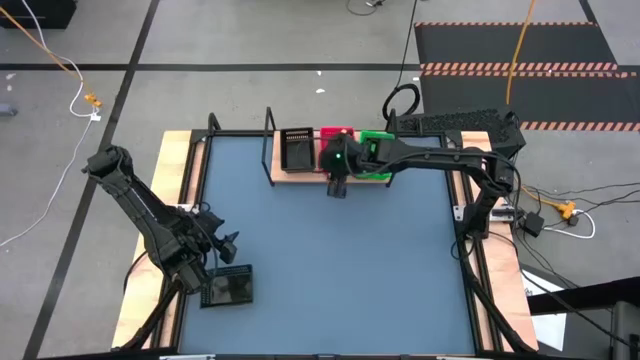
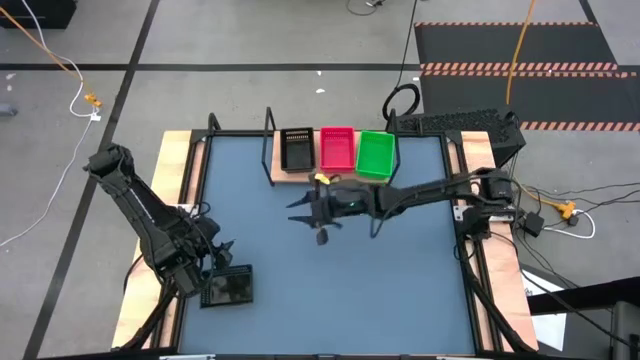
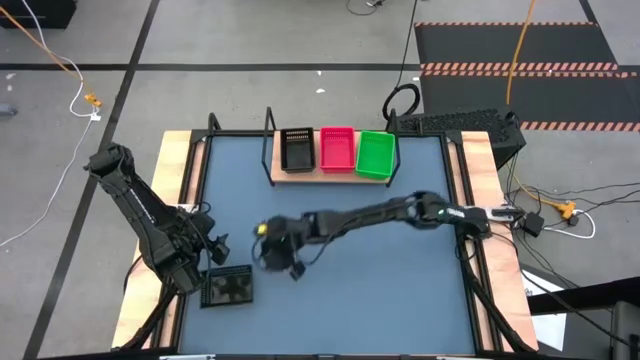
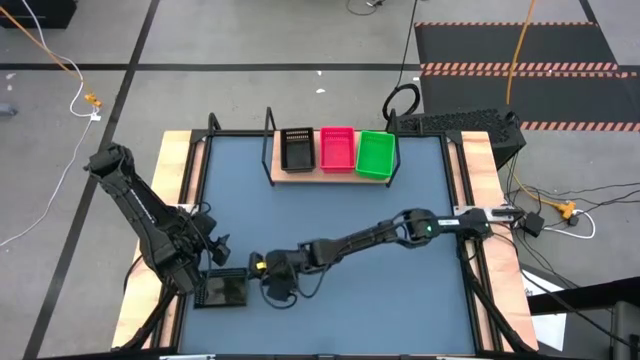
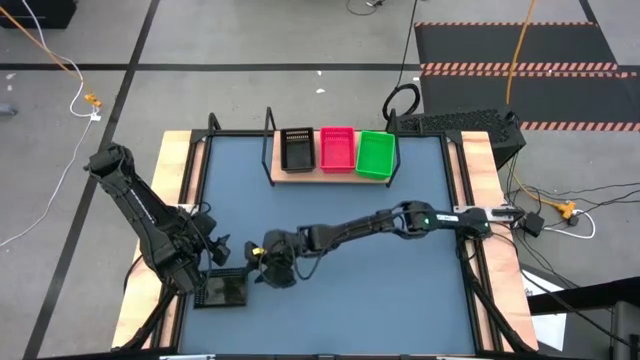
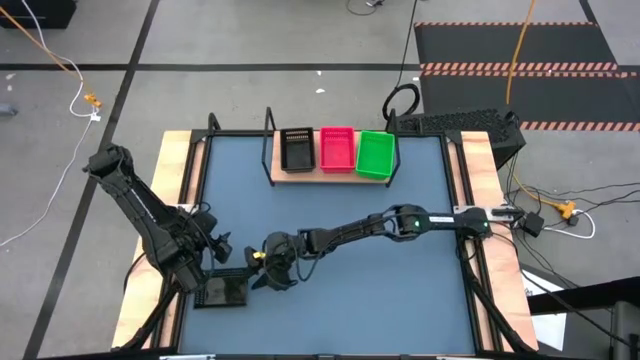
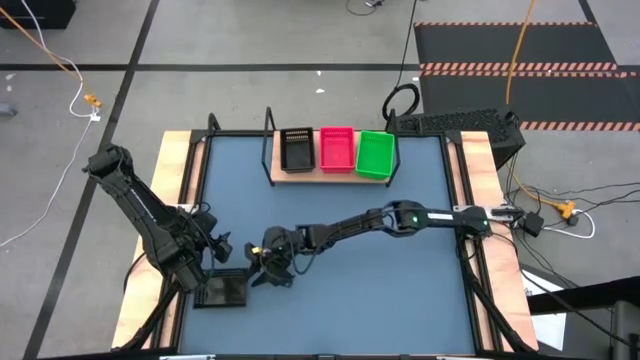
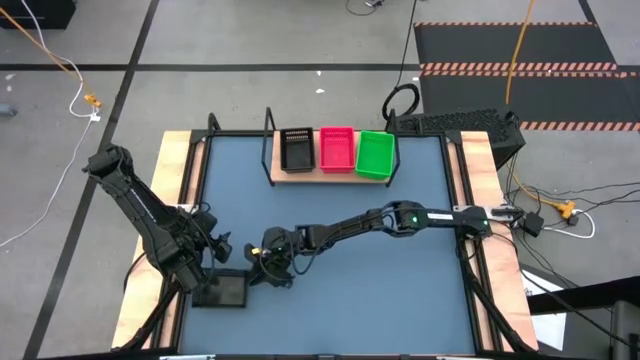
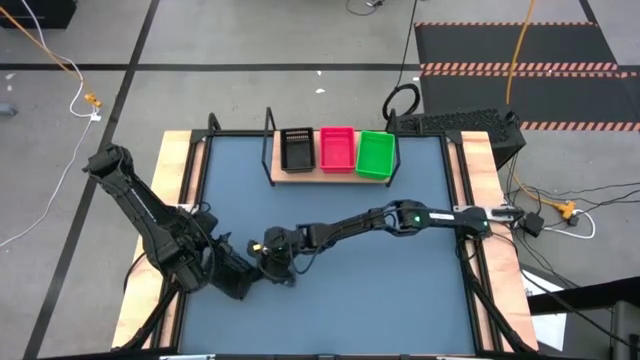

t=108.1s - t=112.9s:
Task: Stack baskets on shelf by color
Stack the black bin on top of the black bin on the shelf

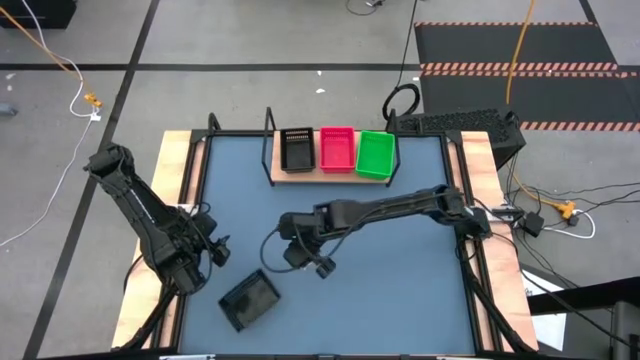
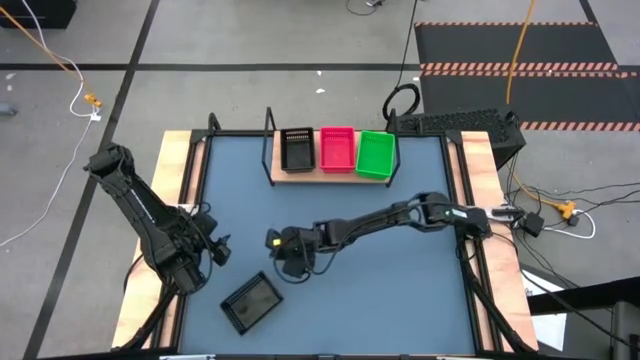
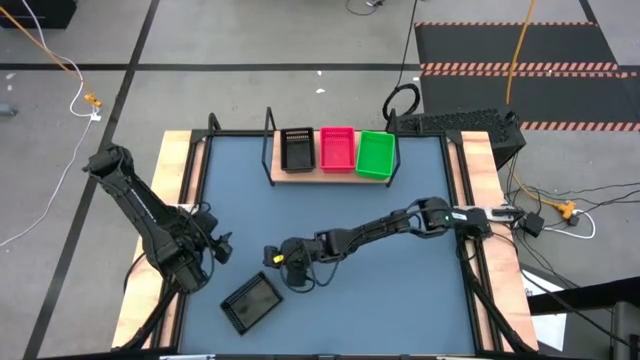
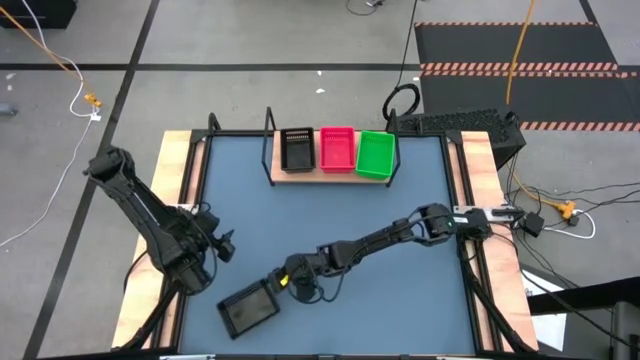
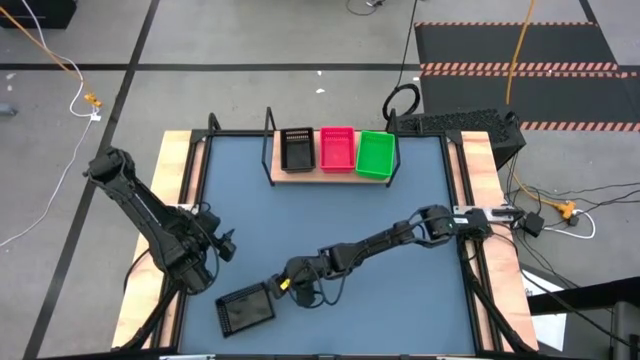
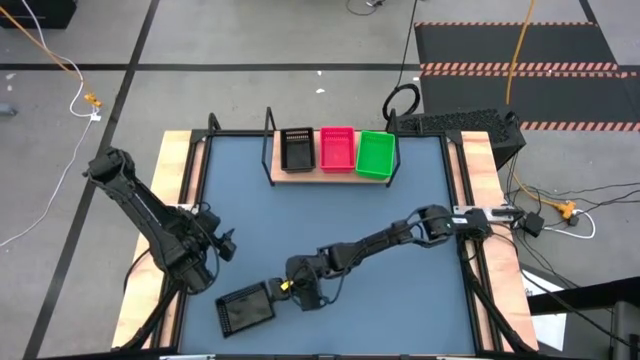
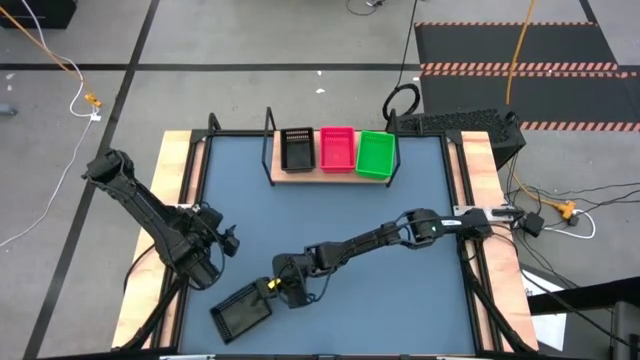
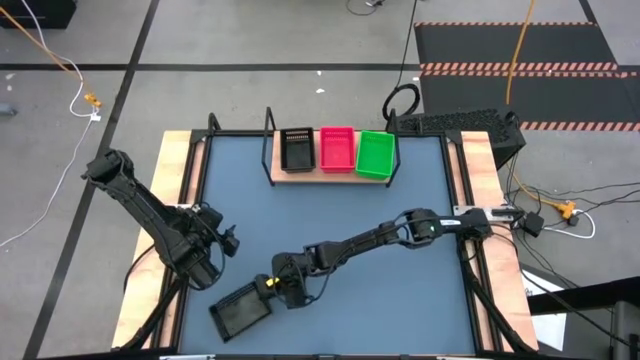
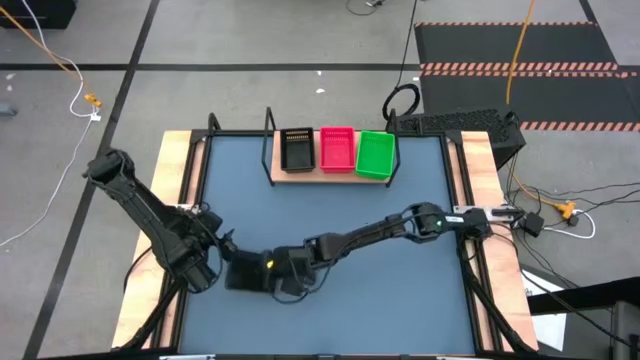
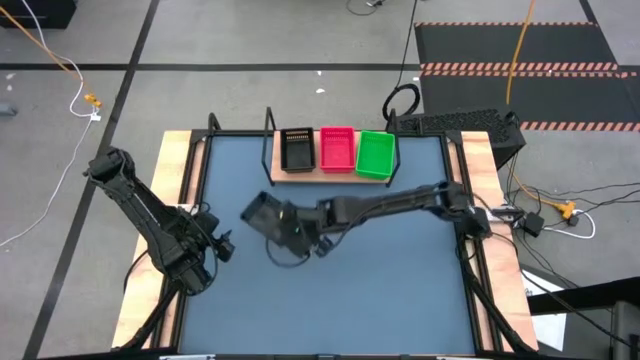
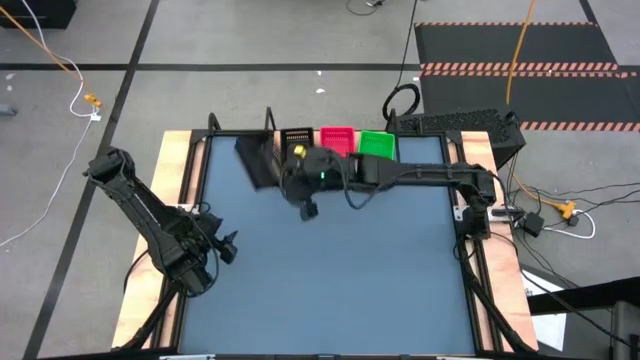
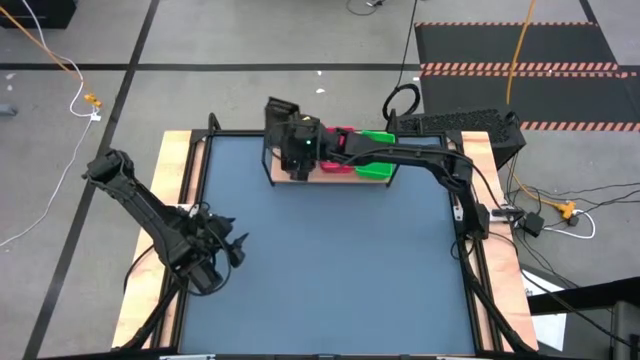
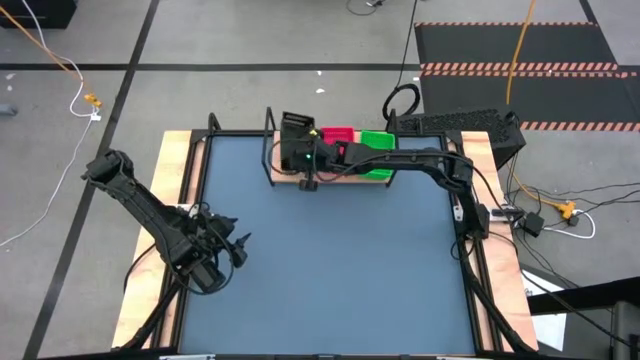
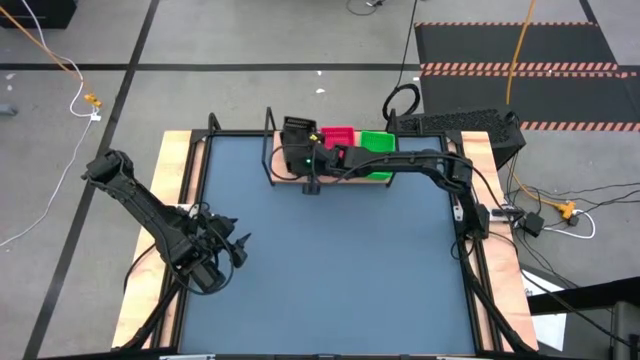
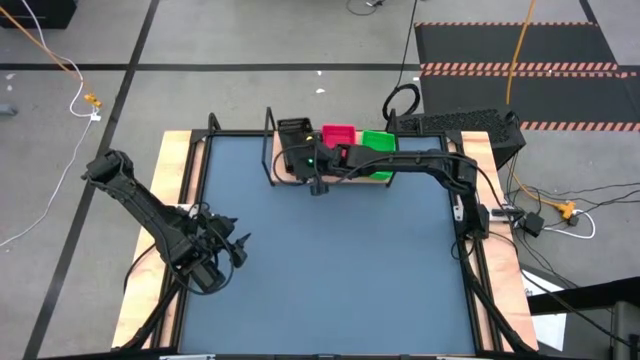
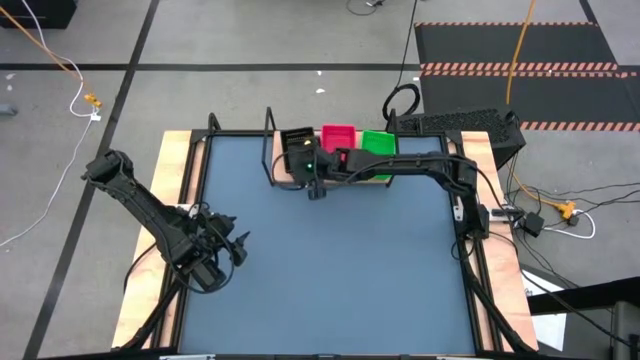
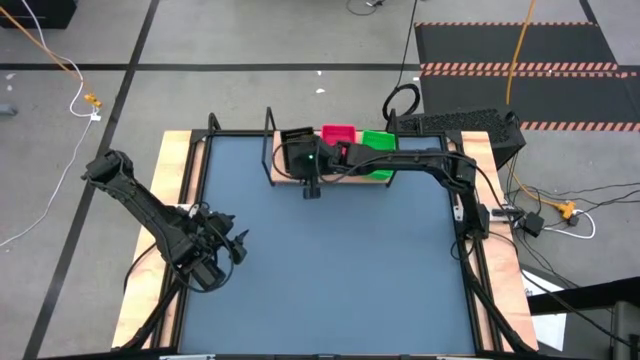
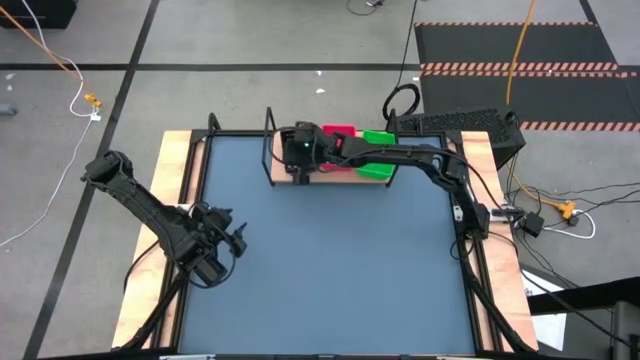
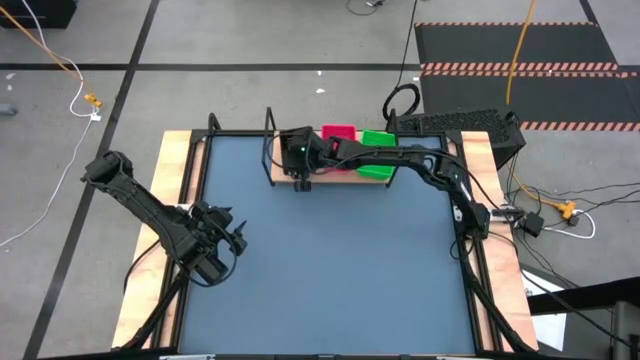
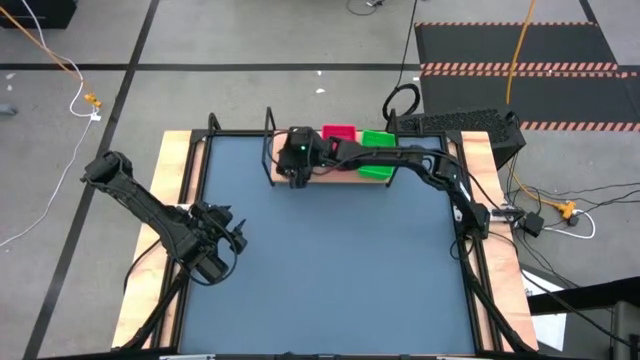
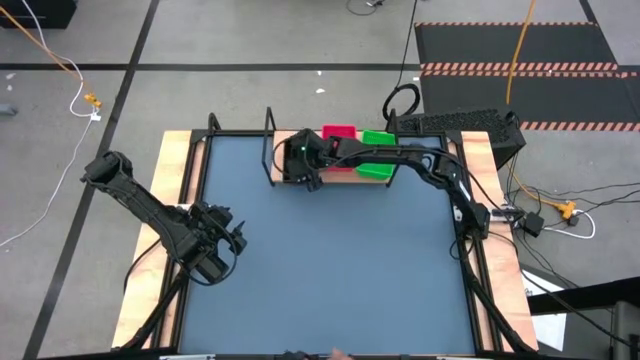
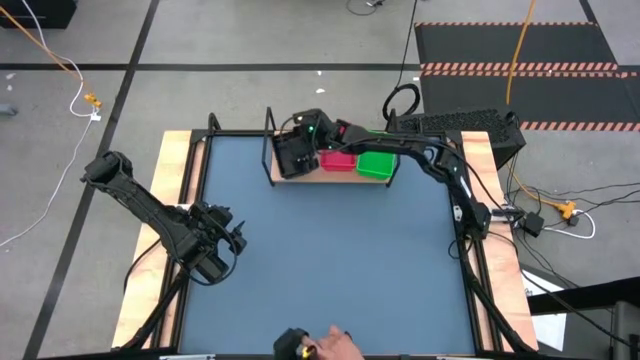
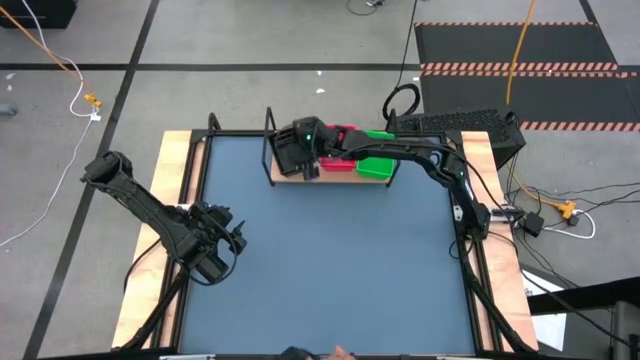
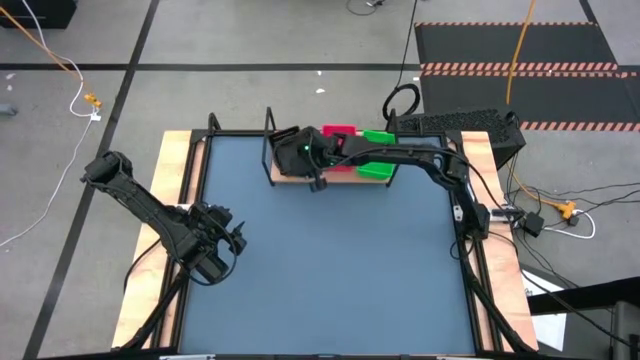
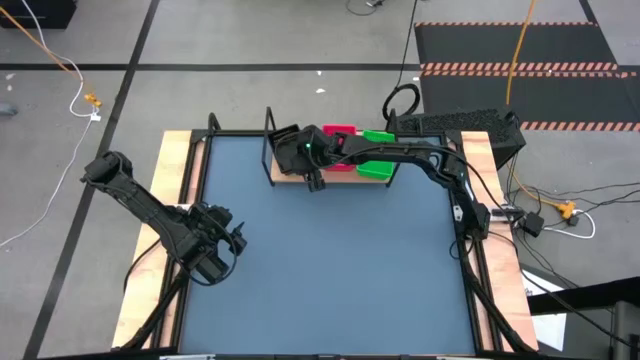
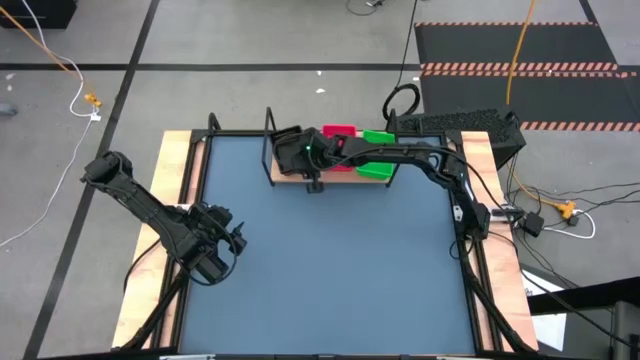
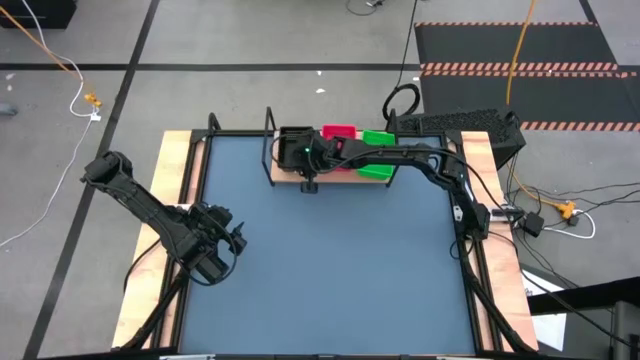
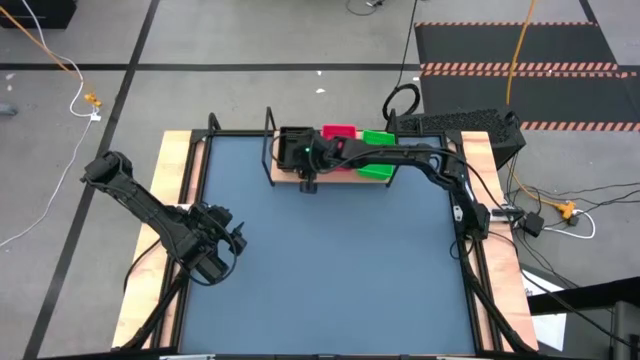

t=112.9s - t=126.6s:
Stack the black bin on top of the black bin on the shelf

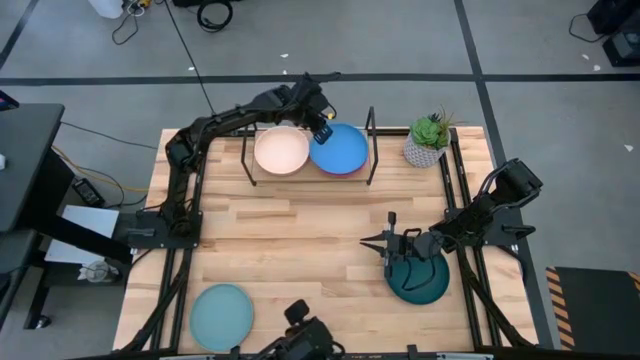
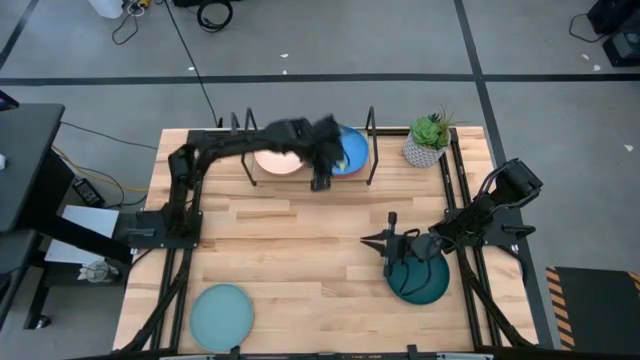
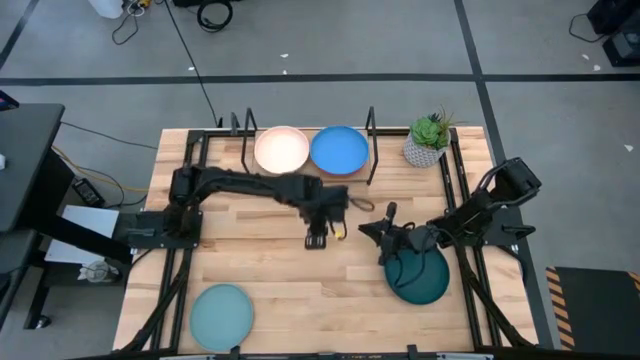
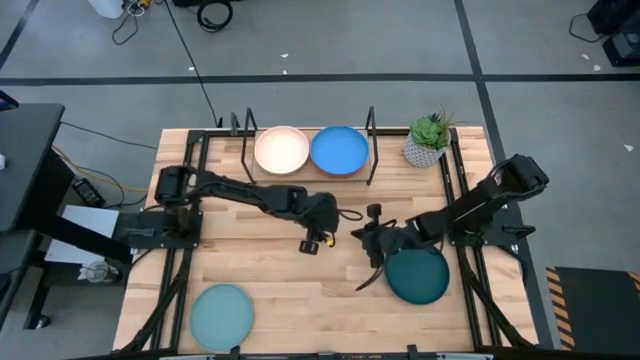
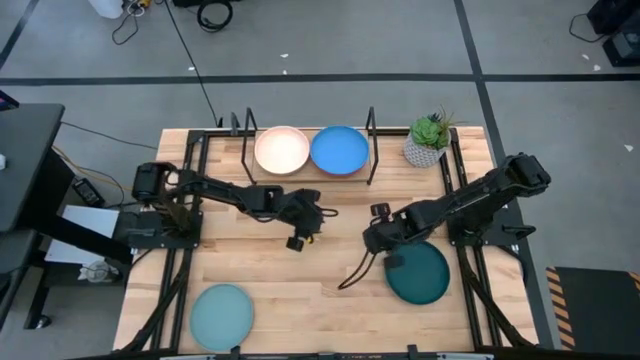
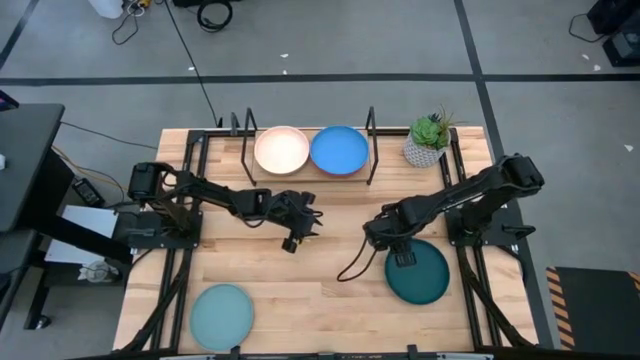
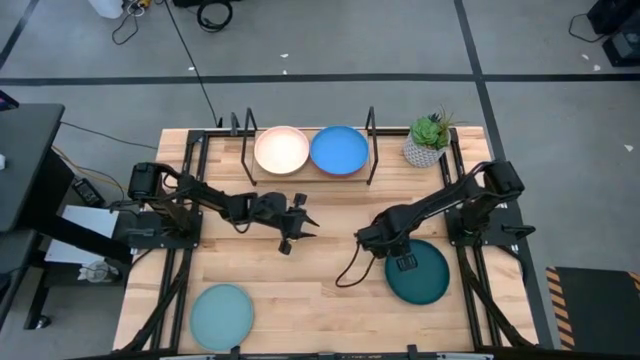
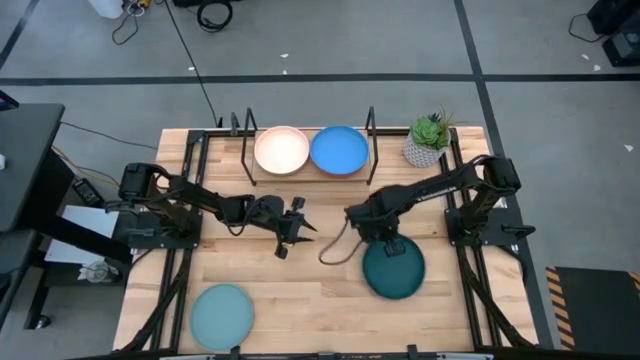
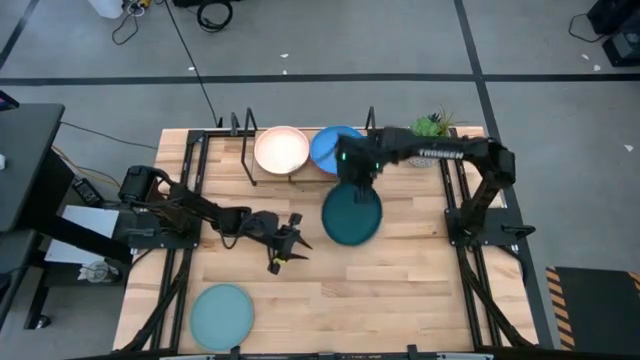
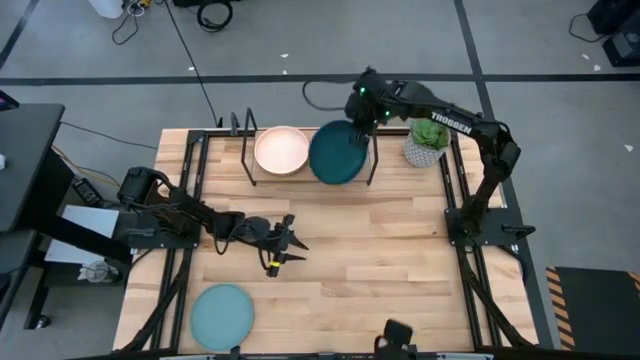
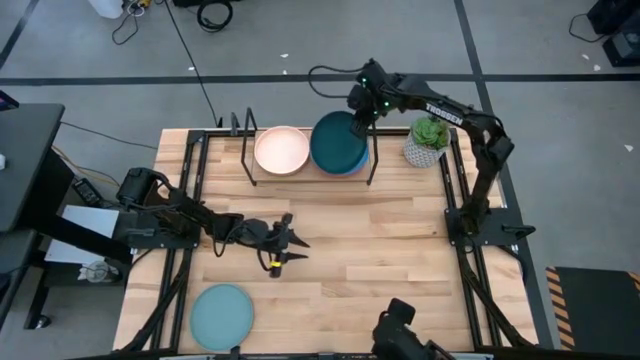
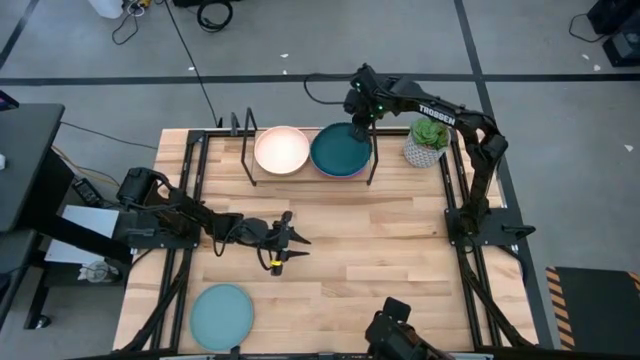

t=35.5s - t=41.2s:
Task: Place and stack plates onto a shelf
Stack the dark green plate on top of the blue plate
